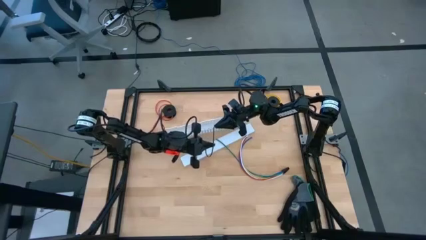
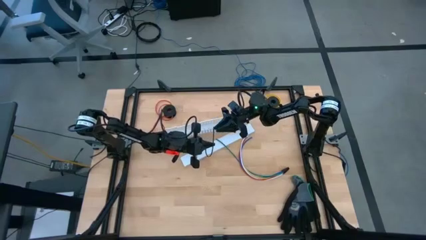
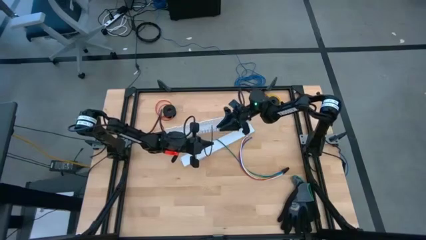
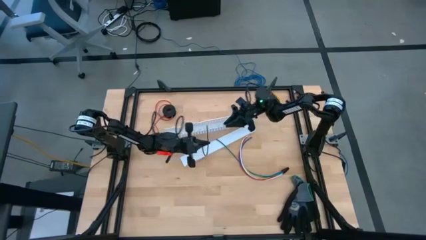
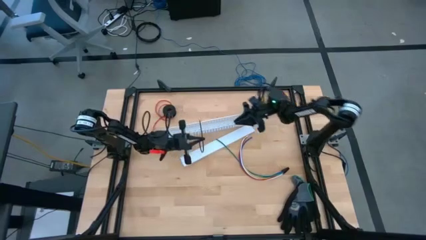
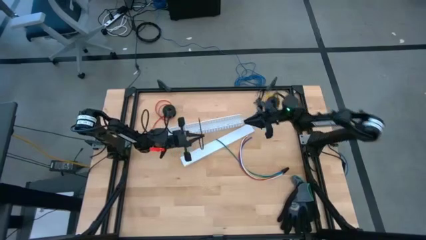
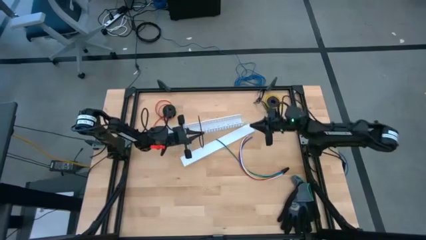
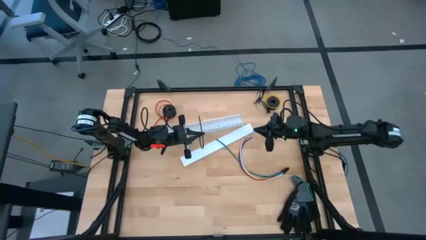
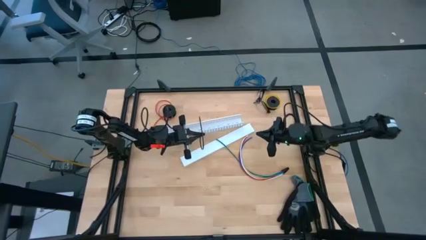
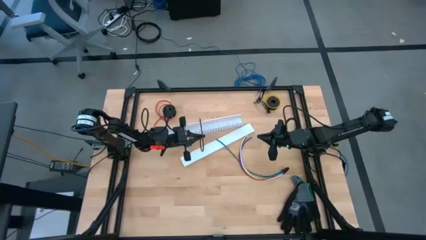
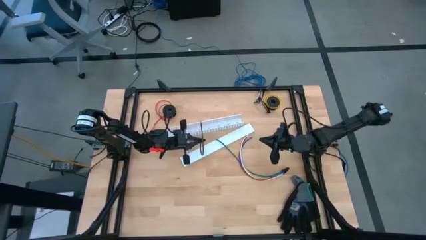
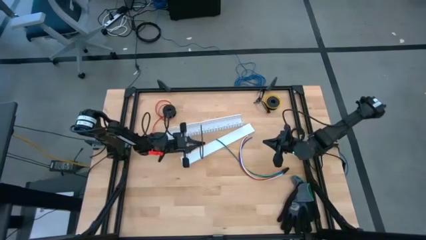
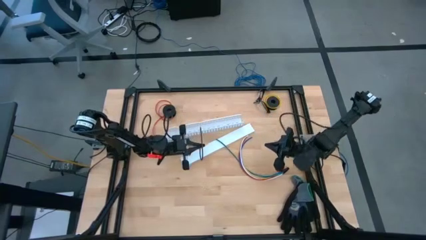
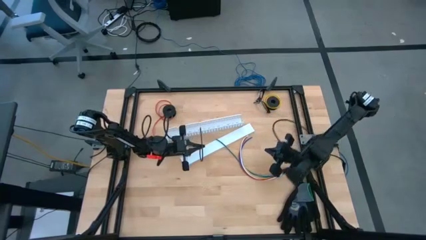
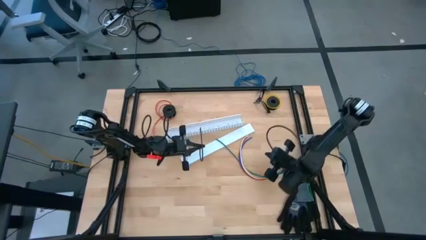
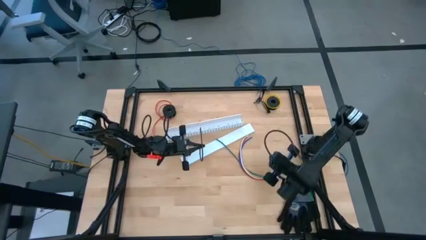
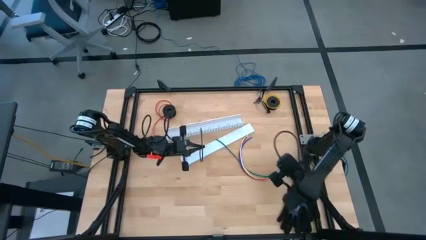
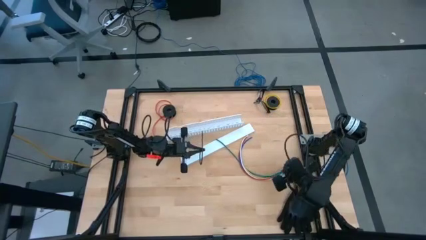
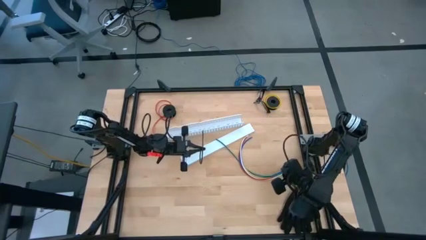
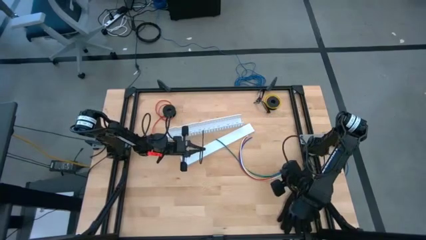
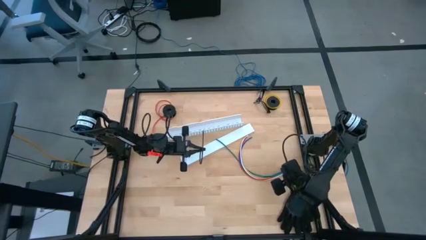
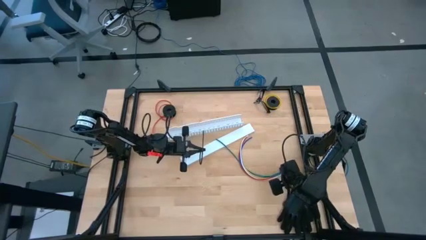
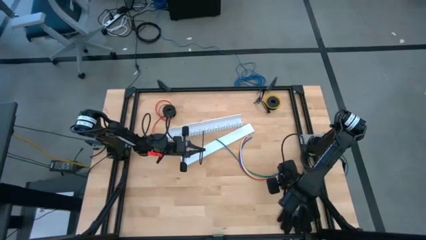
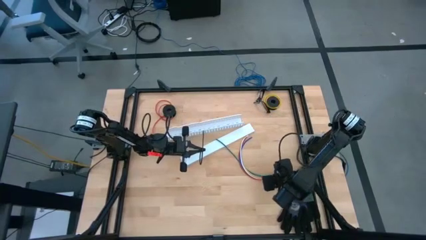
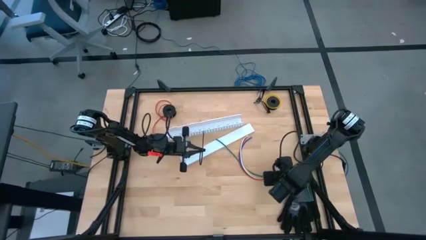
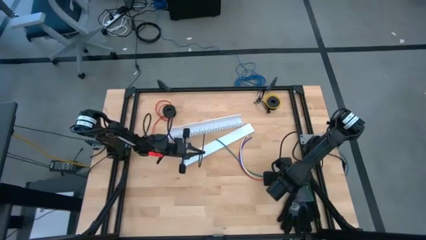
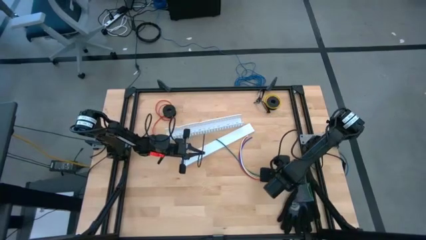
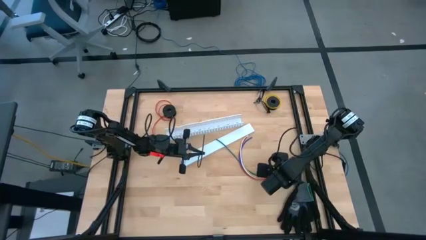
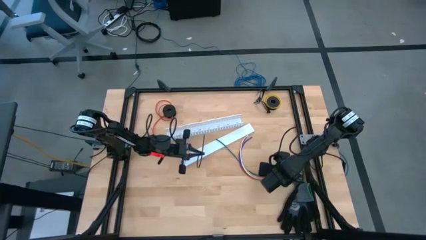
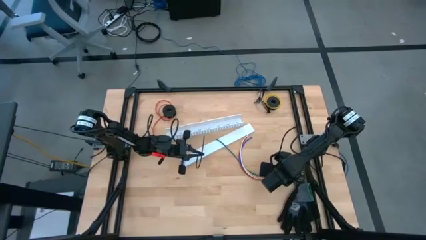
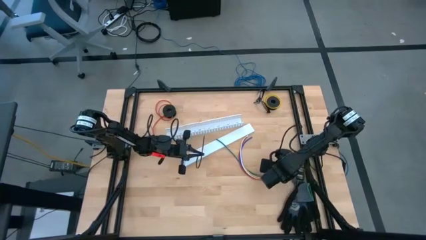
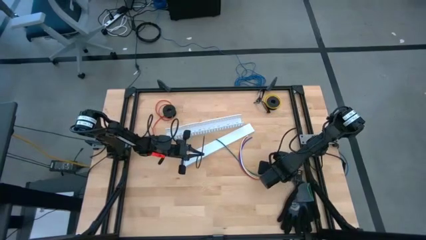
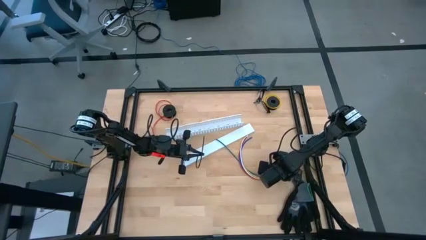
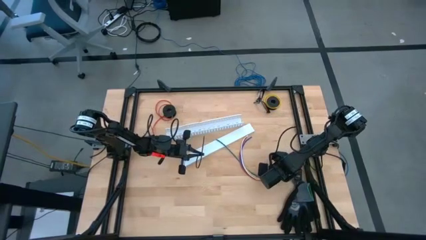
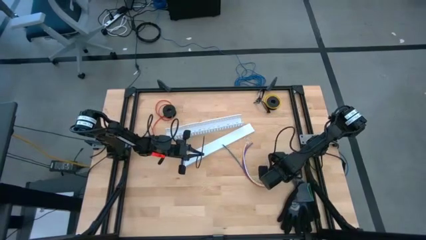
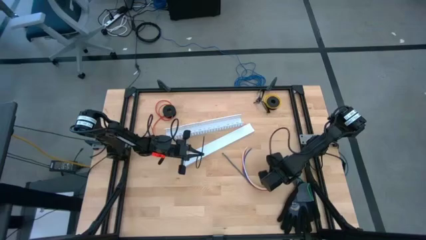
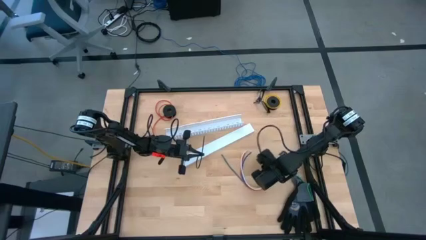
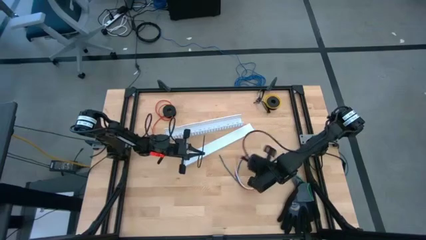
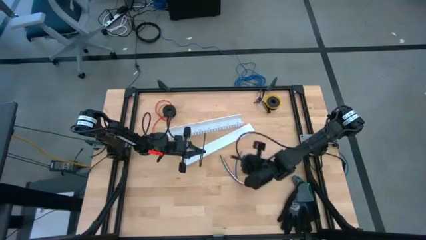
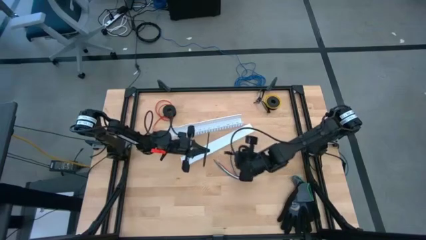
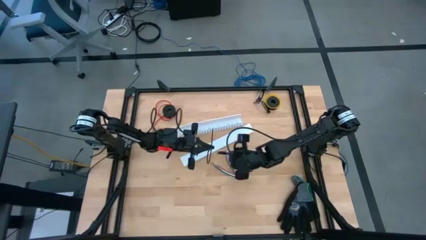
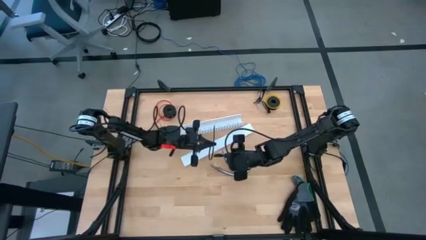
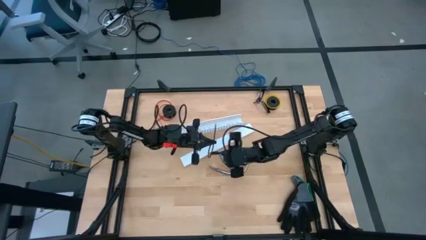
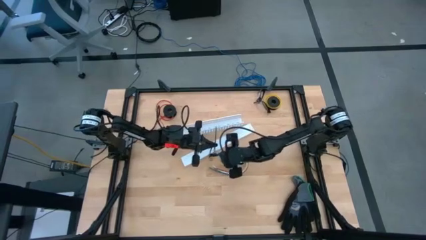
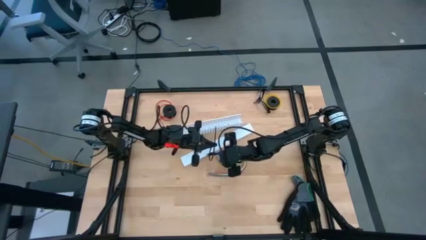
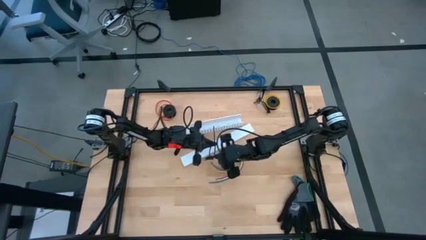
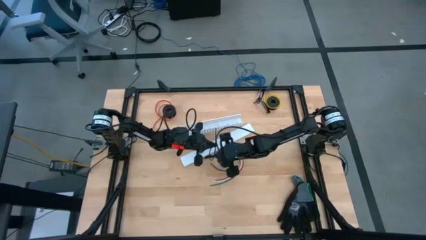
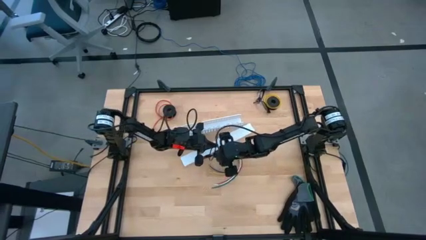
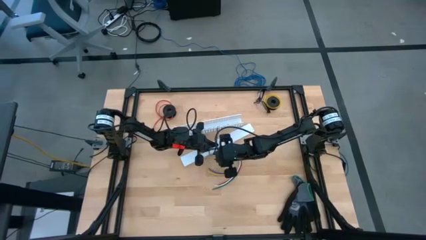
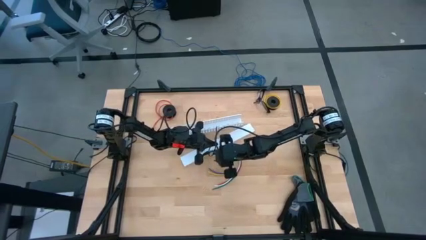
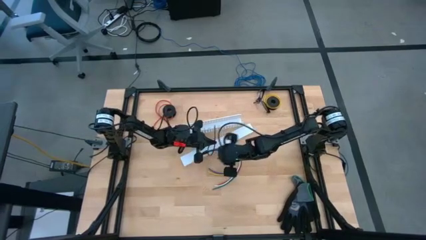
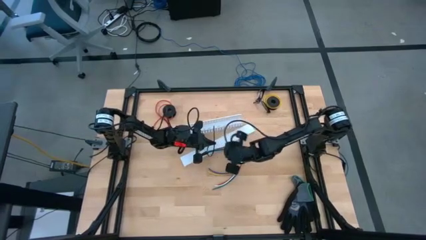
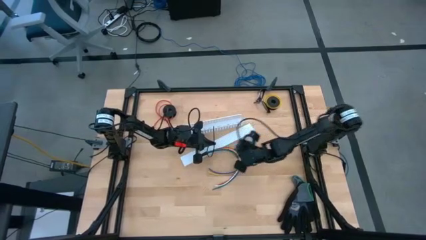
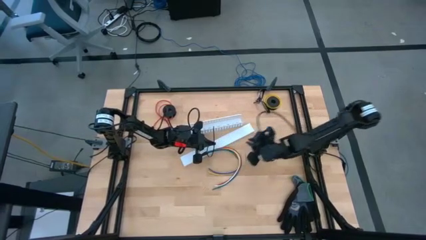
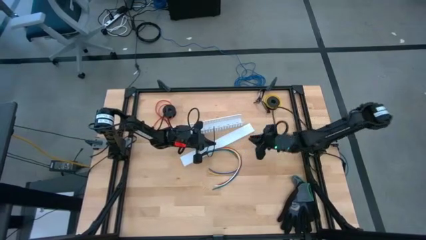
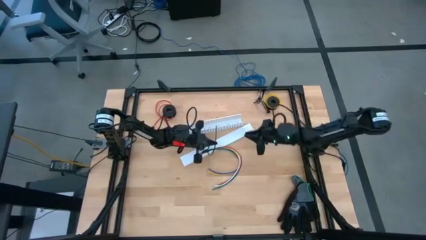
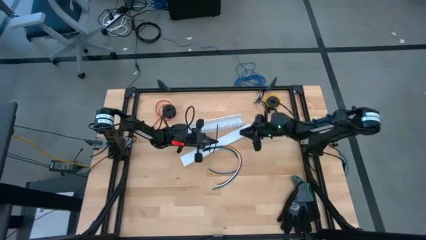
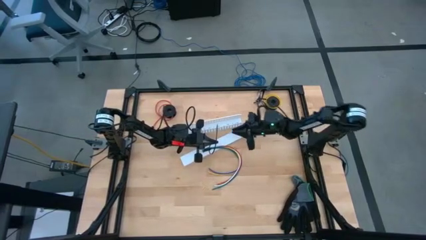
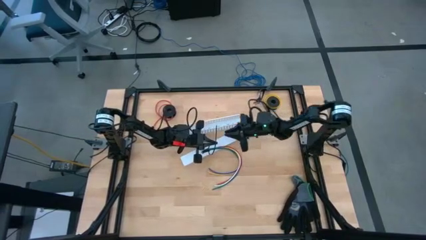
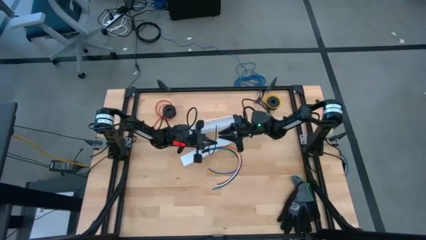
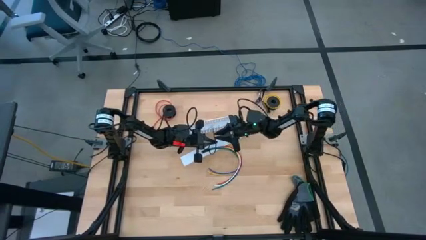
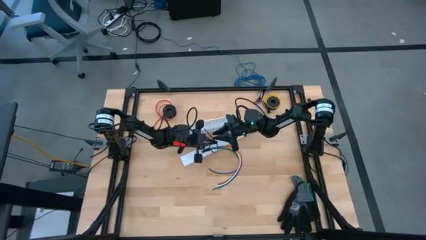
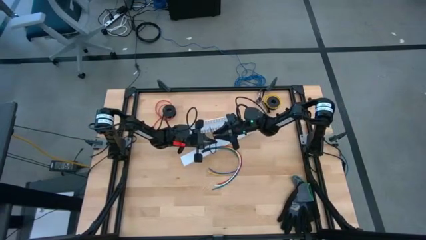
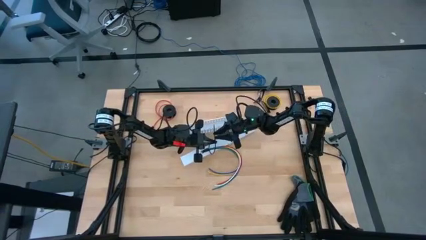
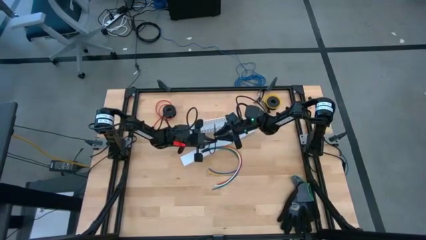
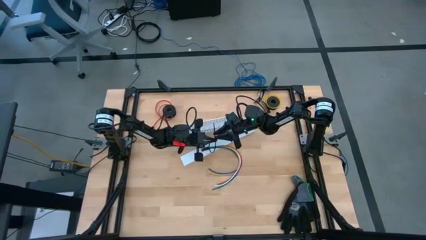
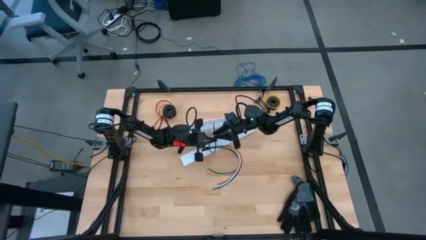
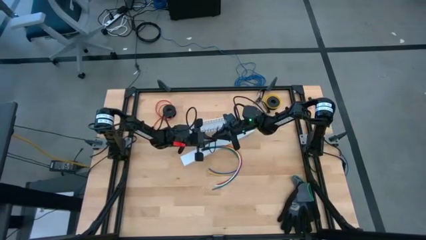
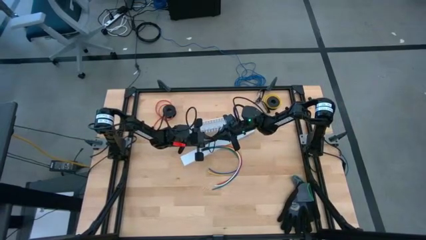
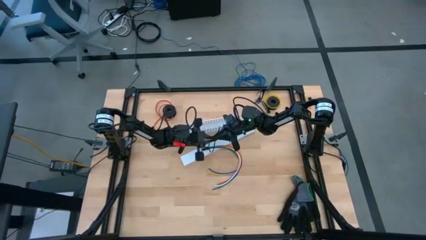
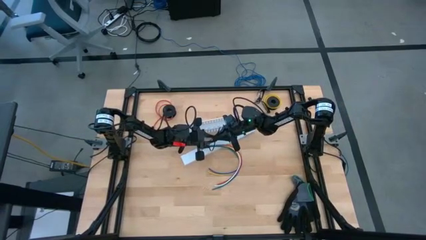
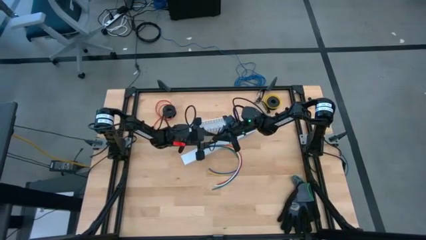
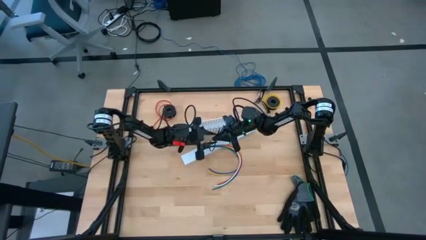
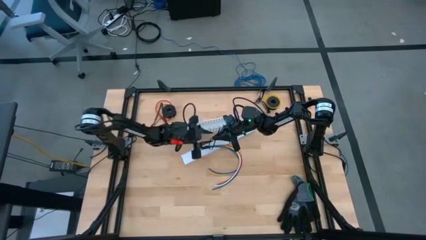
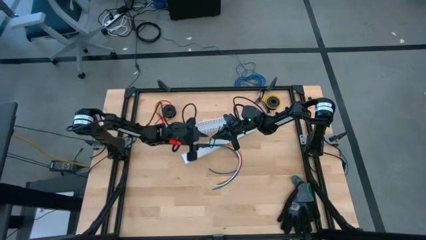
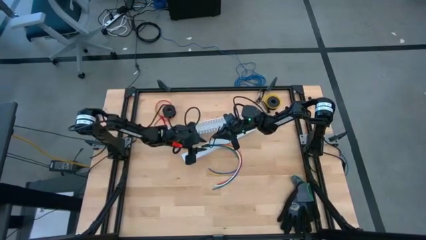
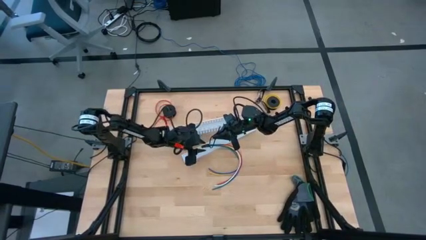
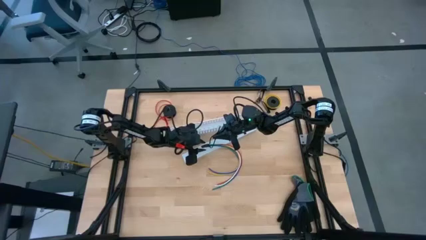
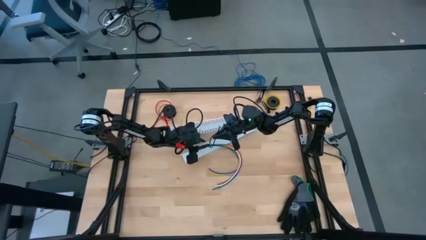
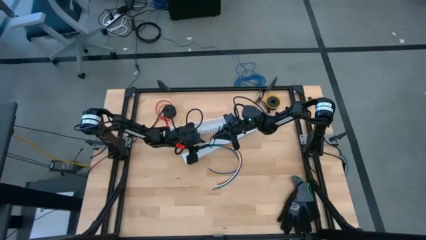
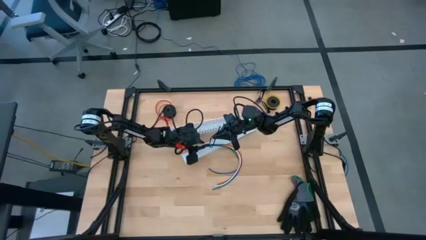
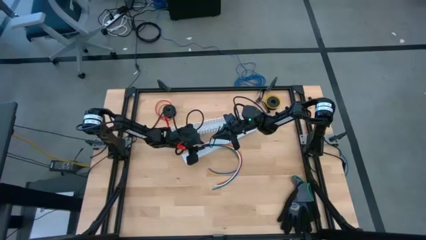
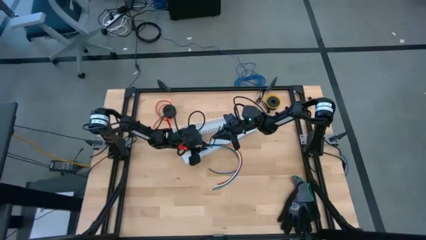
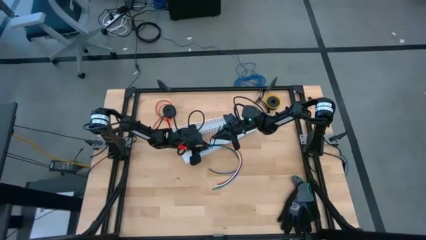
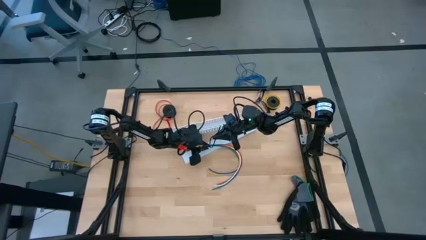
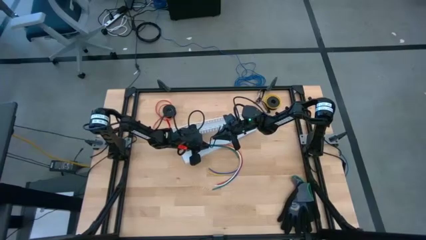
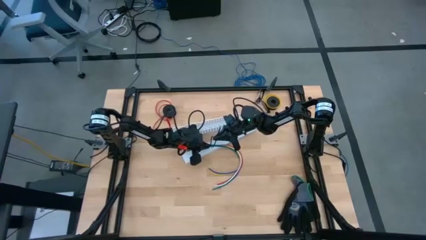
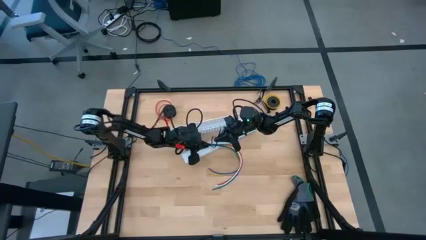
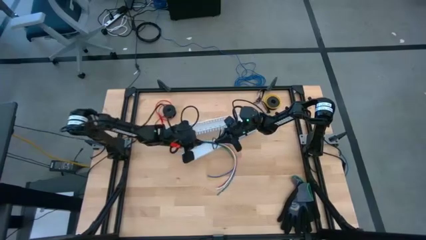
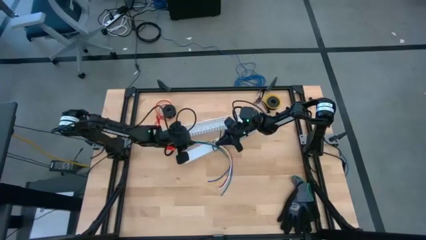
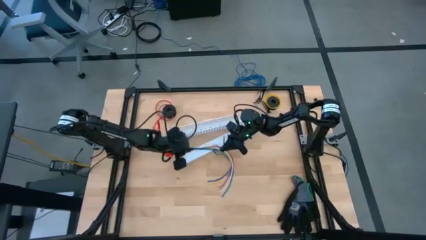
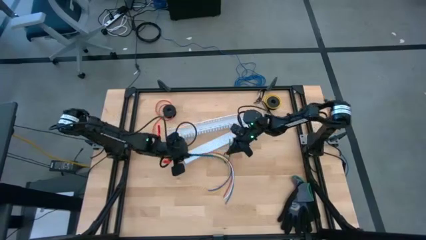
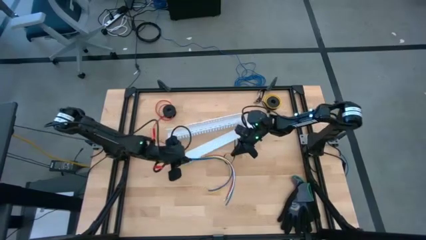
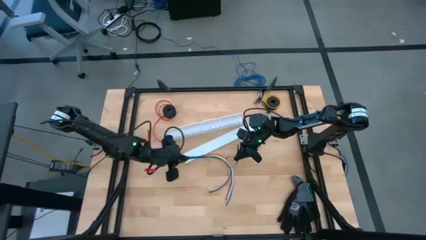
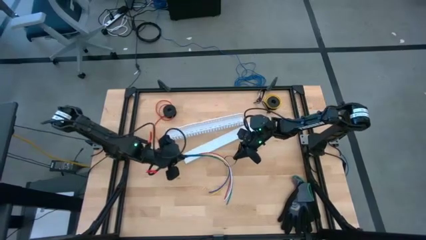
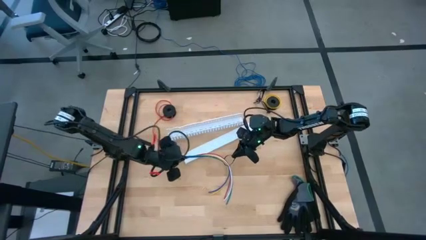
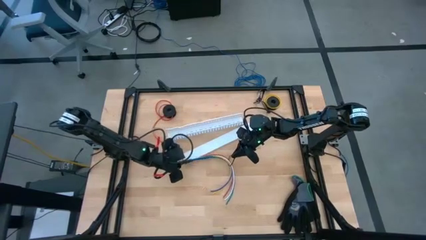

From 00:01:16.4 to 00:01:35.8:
Task: Ziptie cables
Wrap the cables together using the black zip tie
